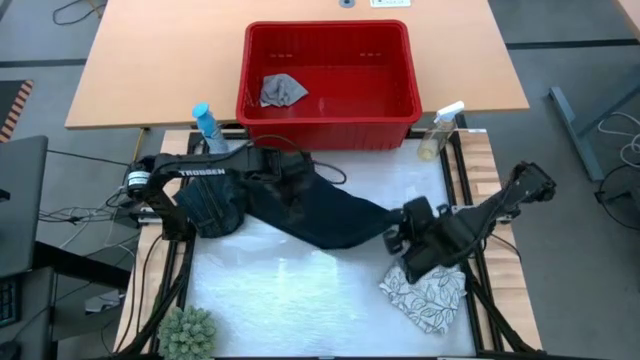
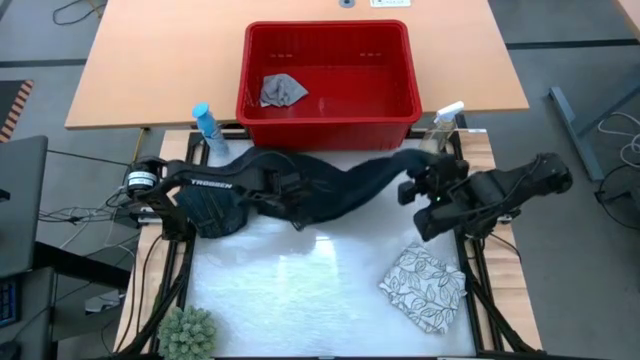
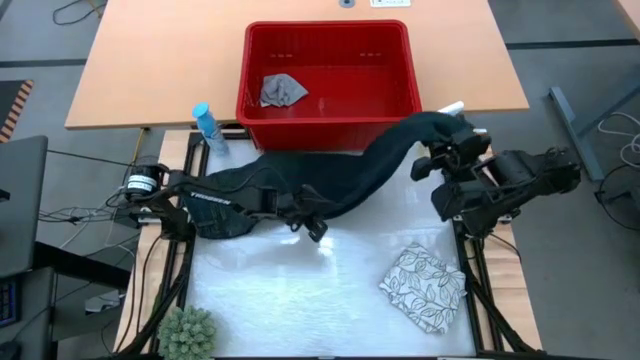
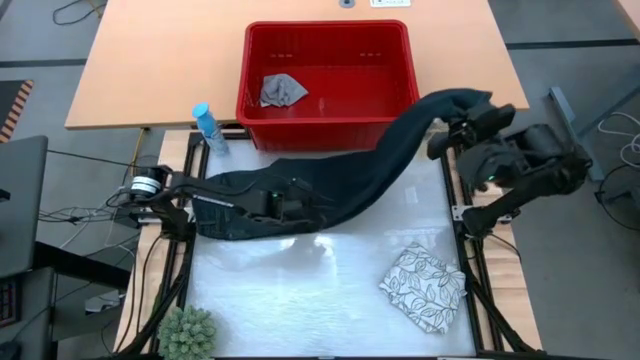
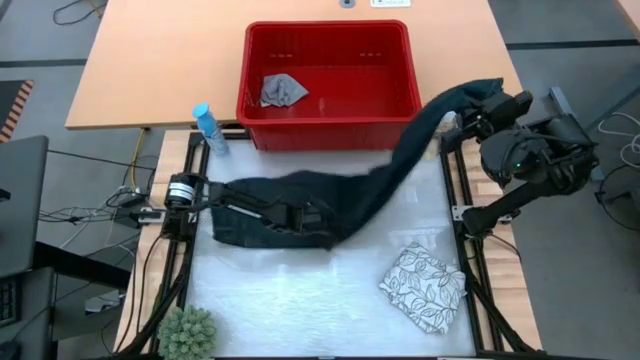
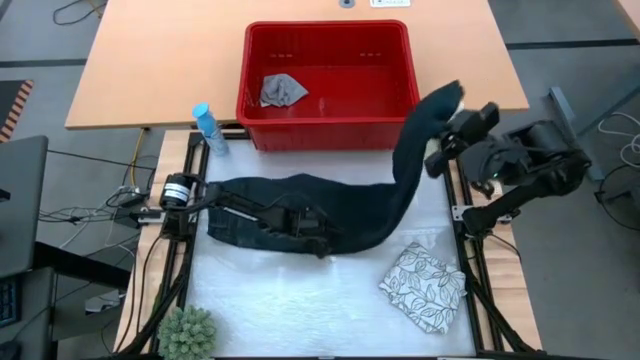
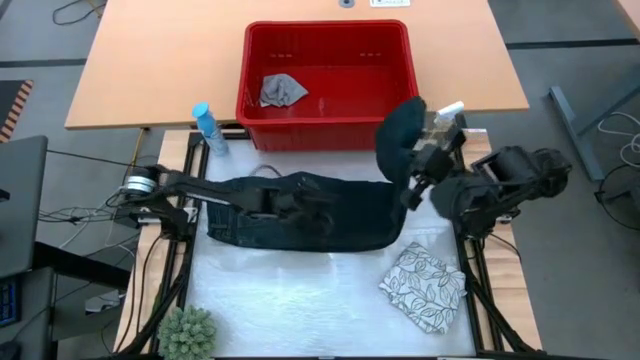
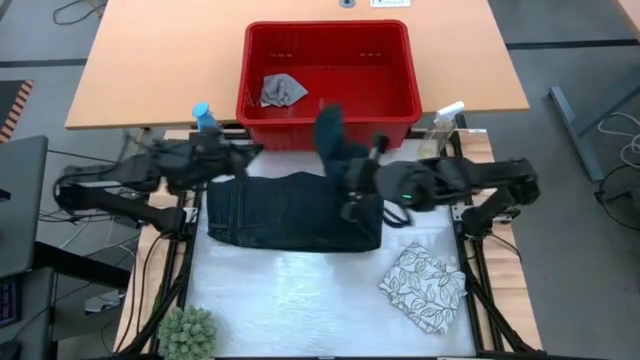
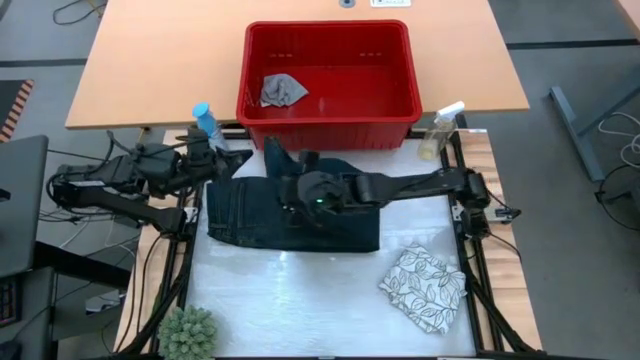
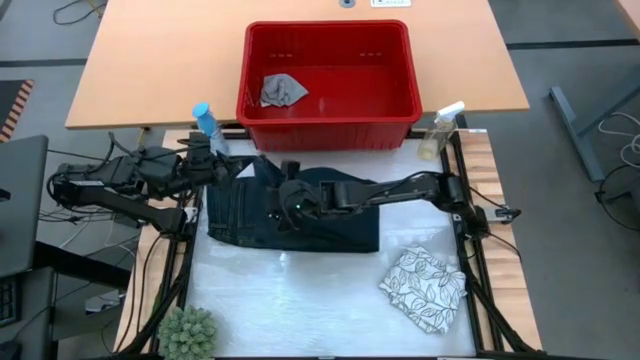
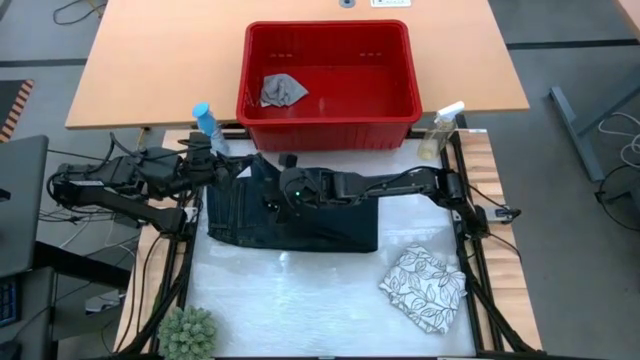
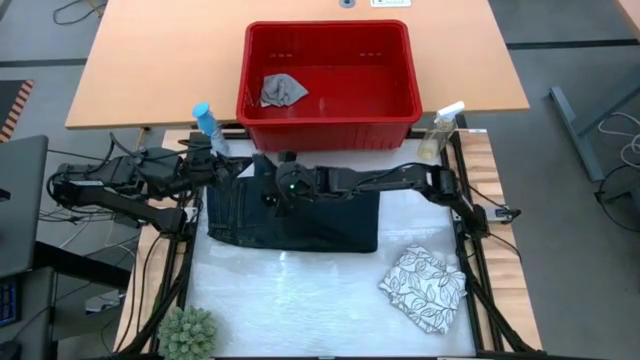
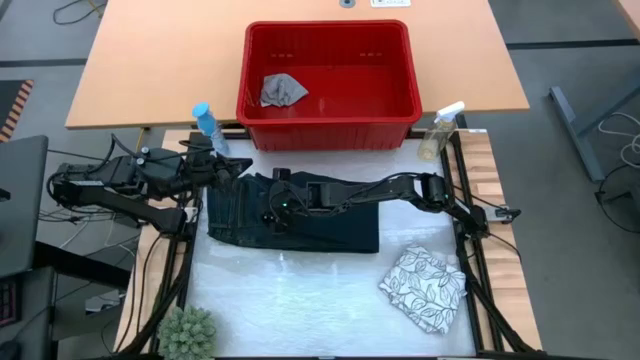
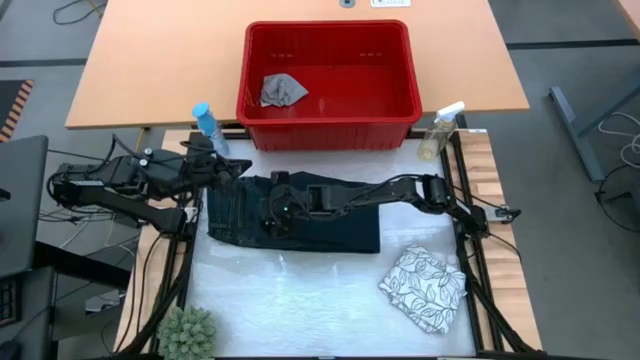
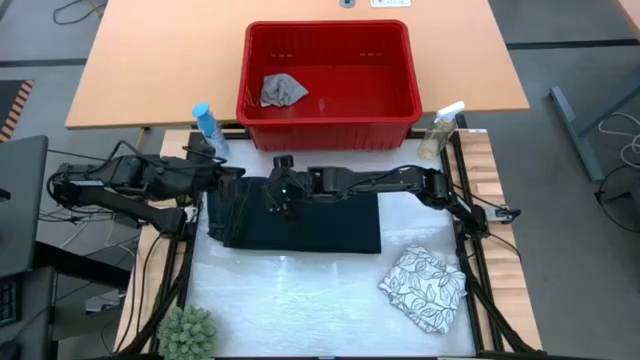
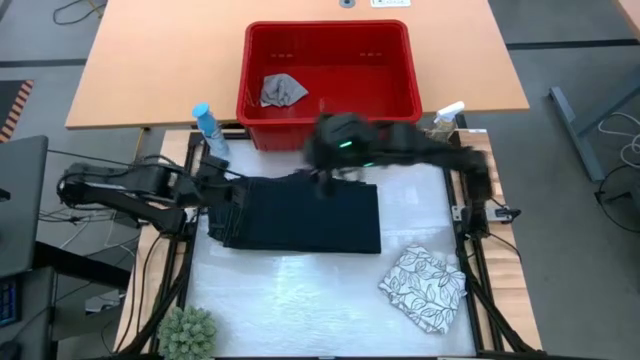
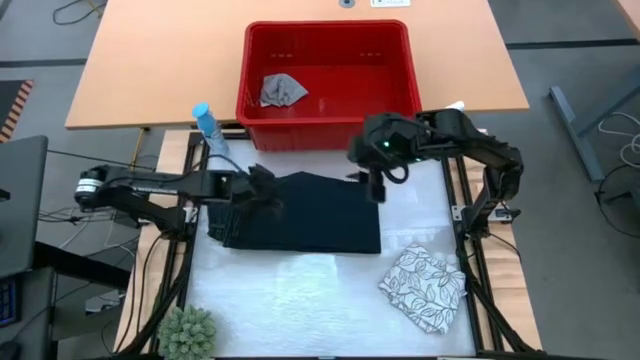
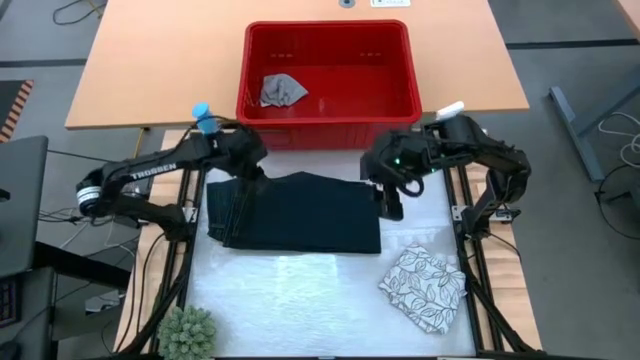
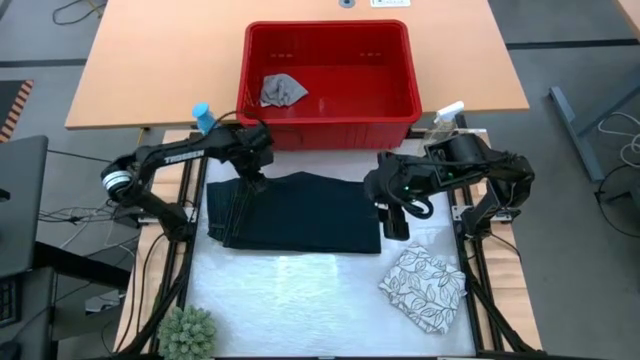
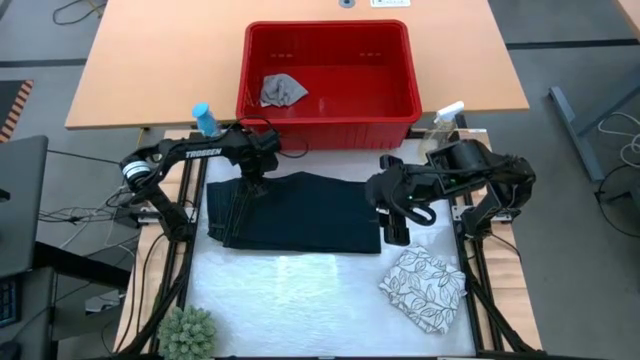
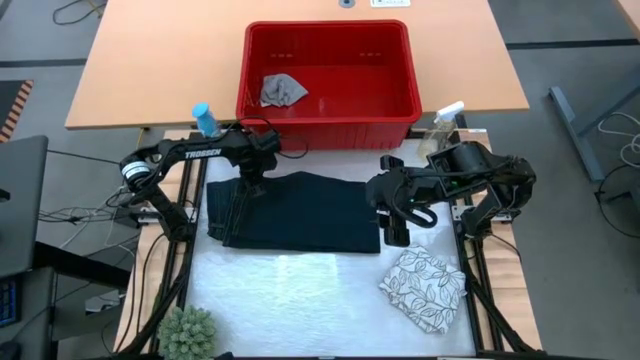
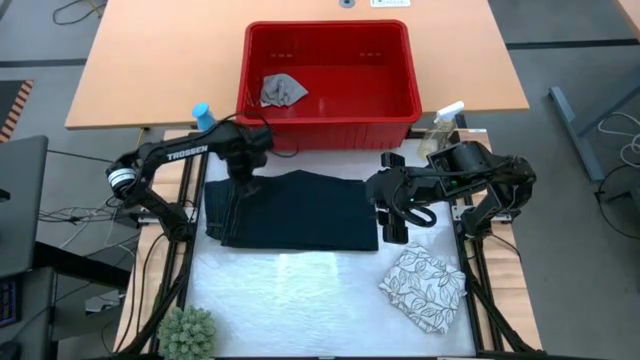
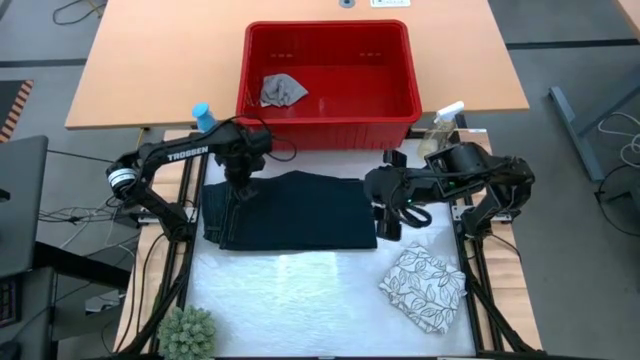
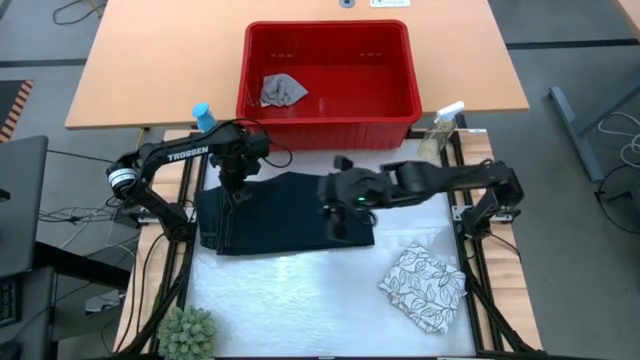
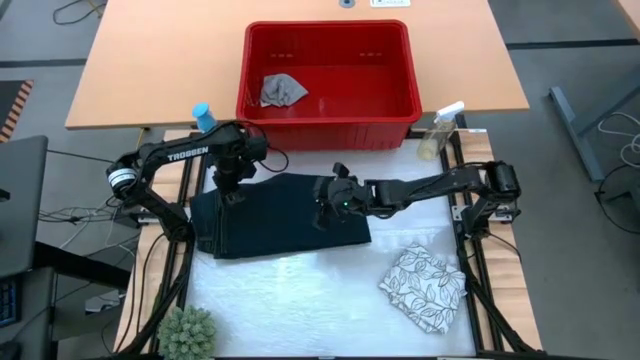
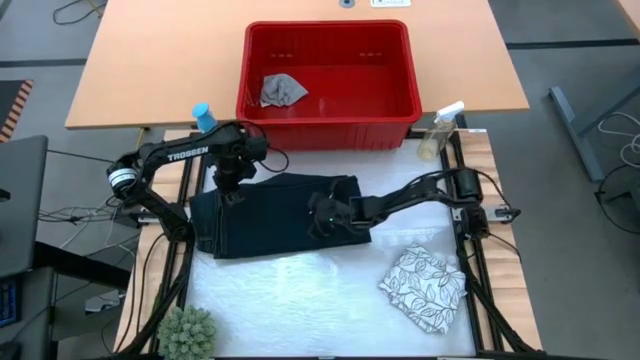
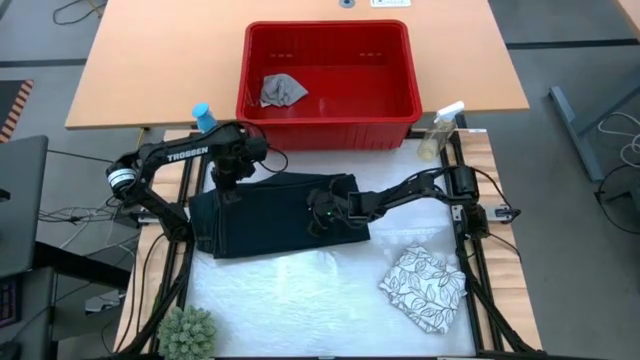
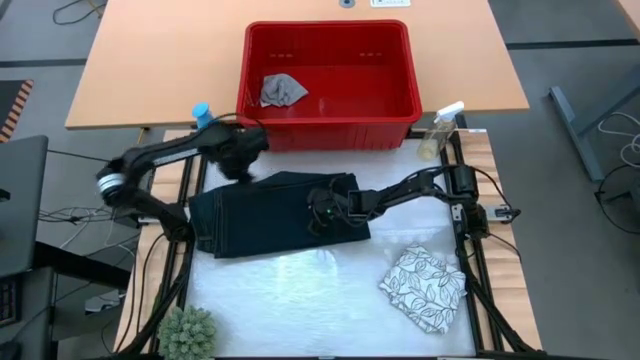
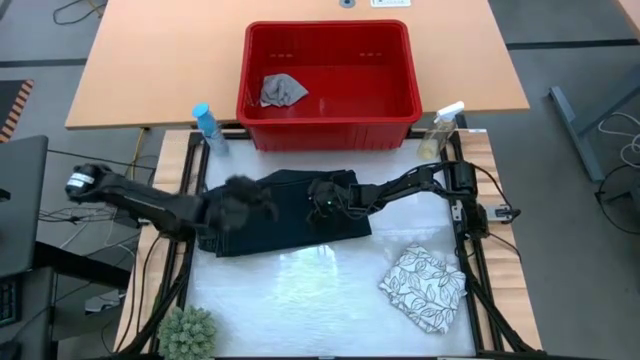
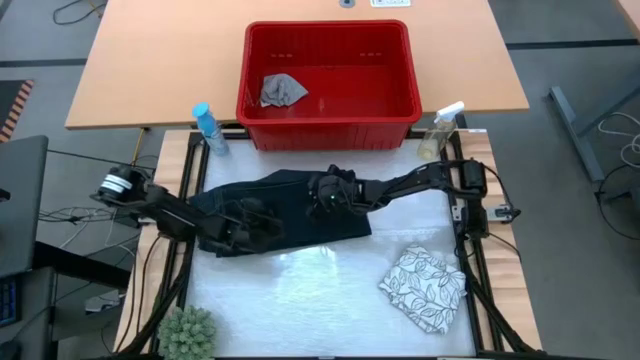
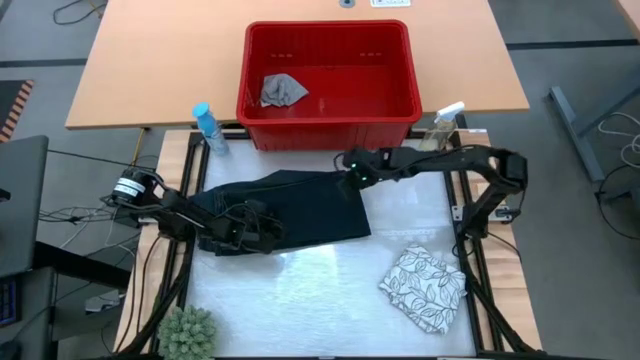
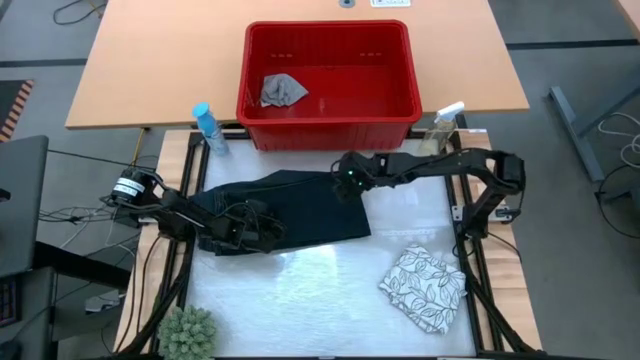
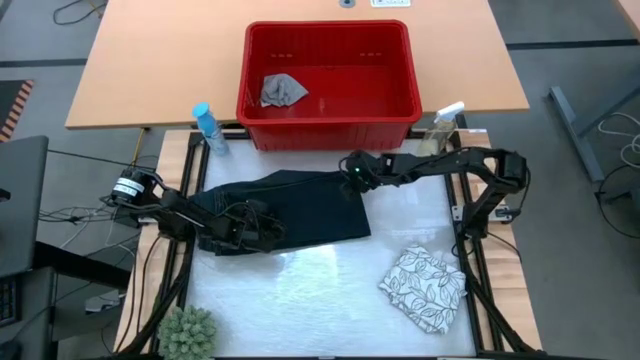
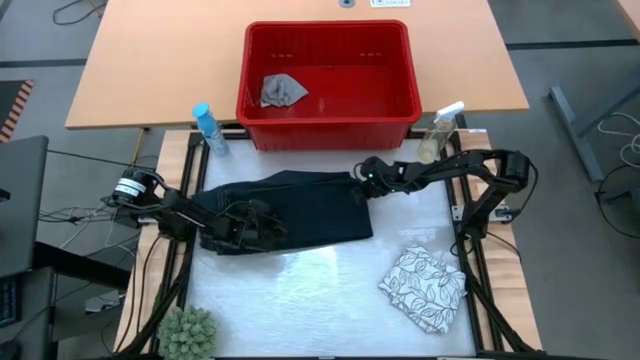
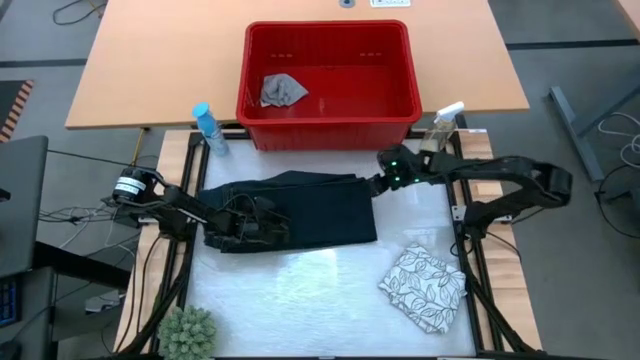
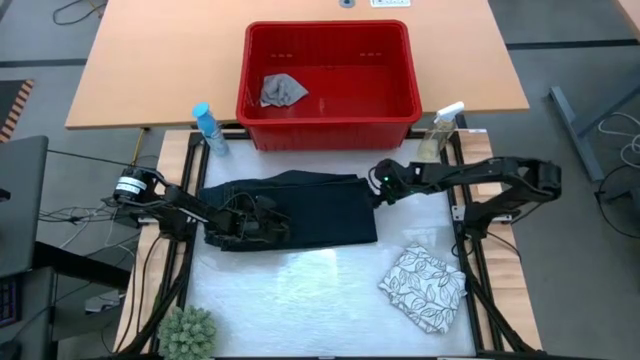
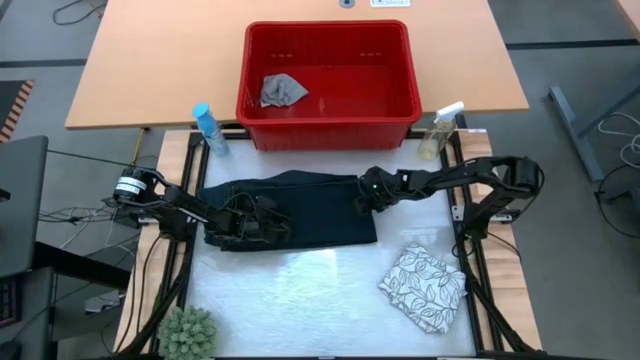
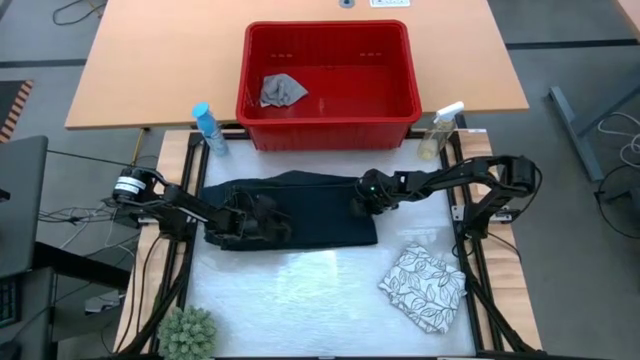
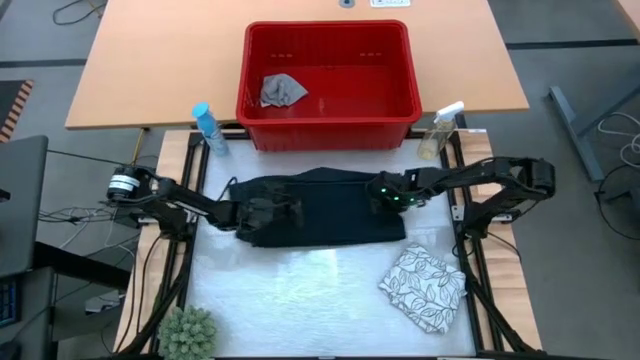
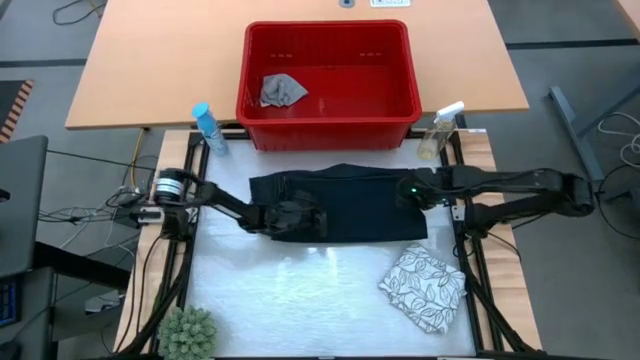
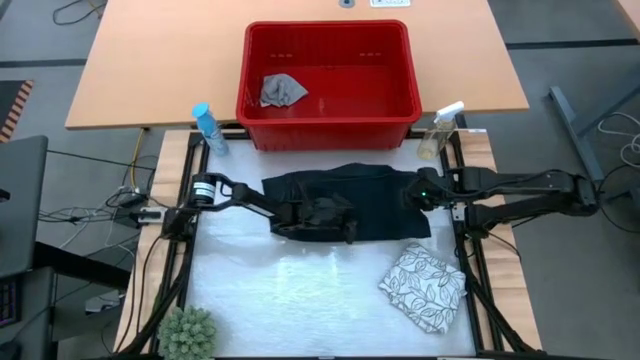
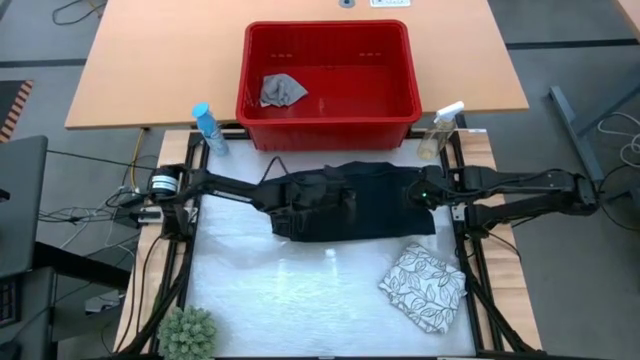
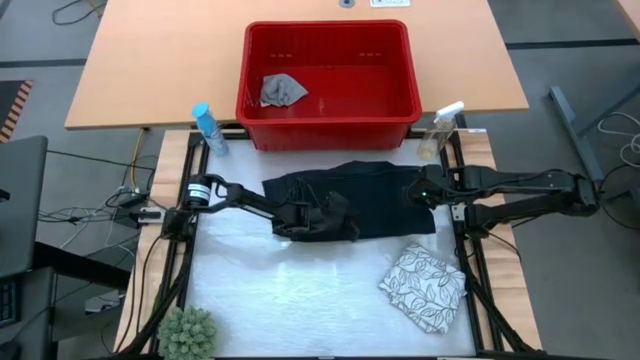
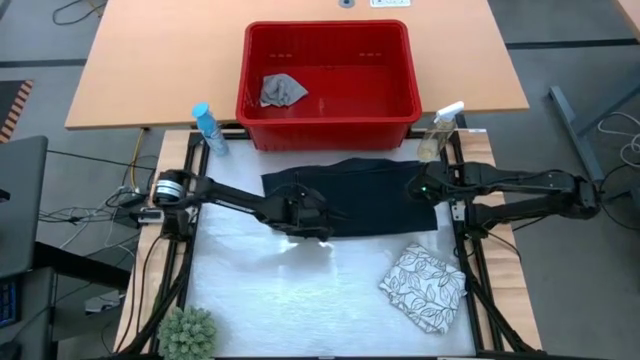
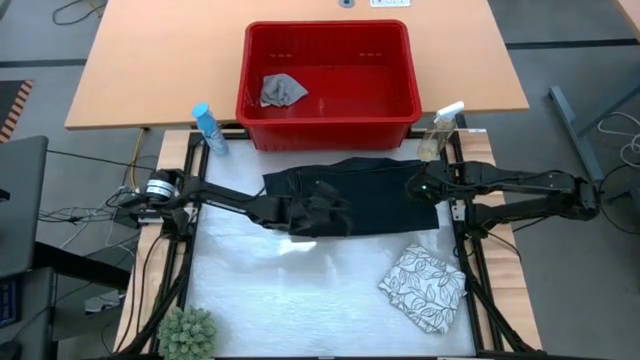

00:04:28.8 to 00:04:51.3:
Task: Fold laundry
Fold the dark blue pants
